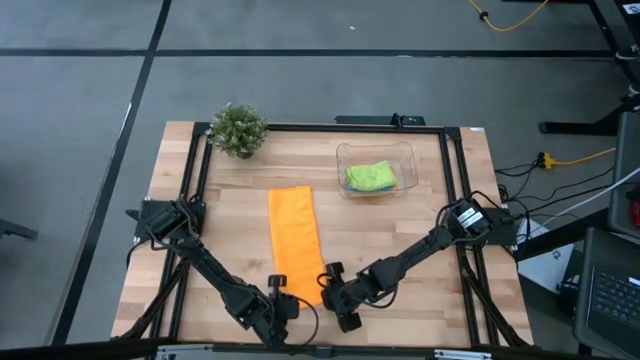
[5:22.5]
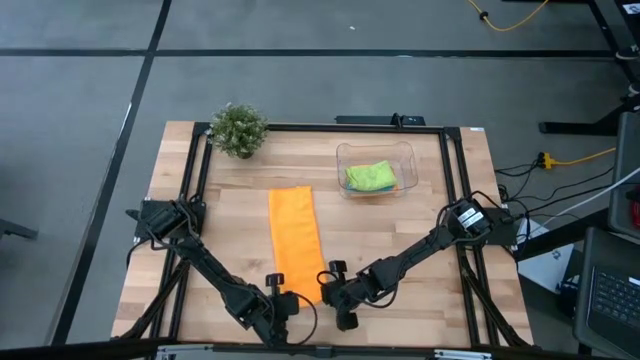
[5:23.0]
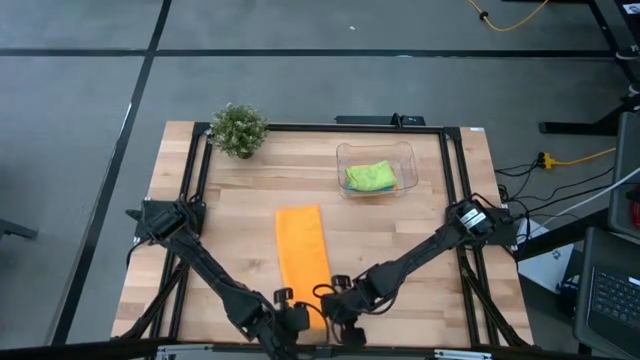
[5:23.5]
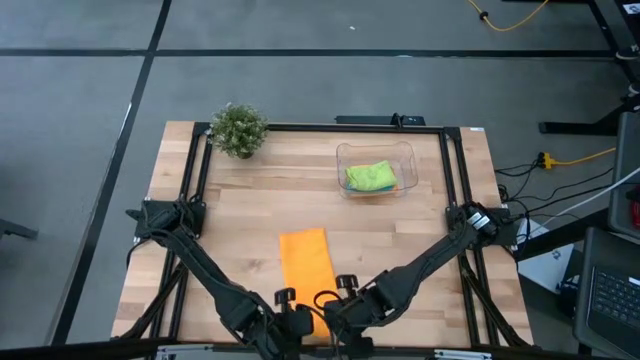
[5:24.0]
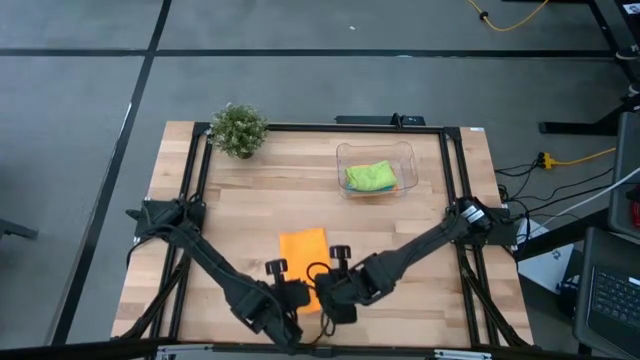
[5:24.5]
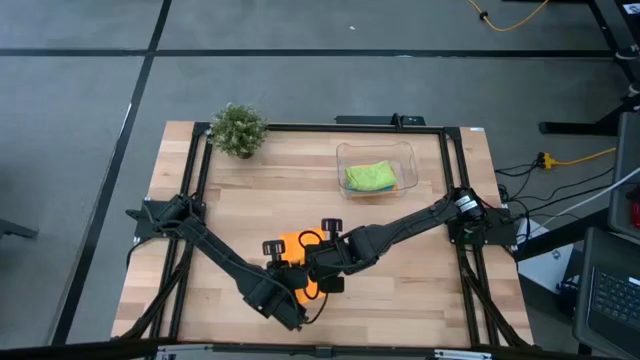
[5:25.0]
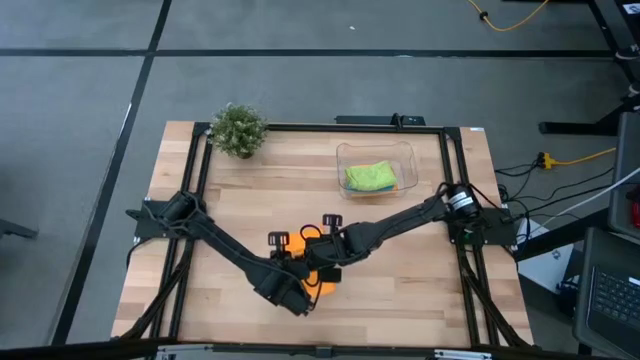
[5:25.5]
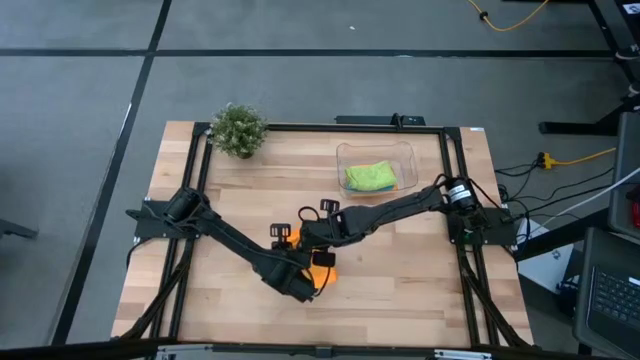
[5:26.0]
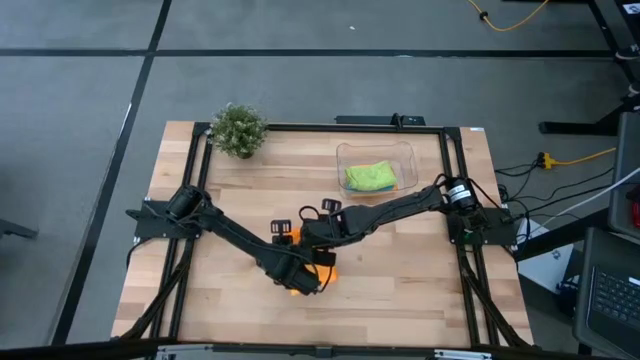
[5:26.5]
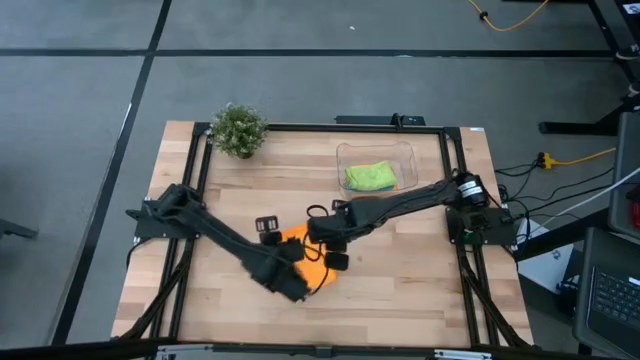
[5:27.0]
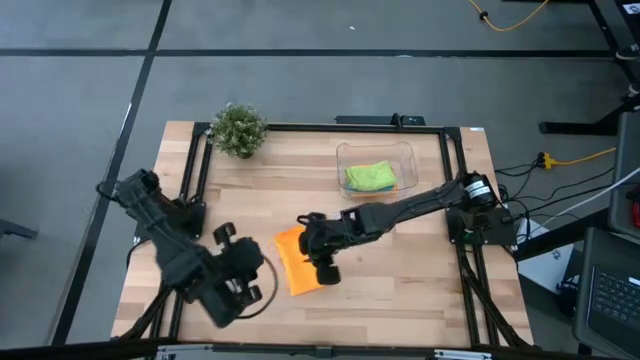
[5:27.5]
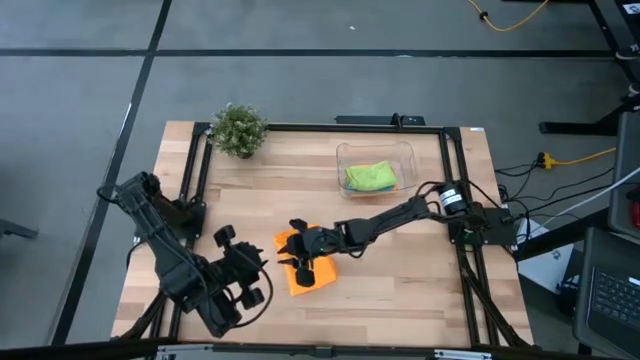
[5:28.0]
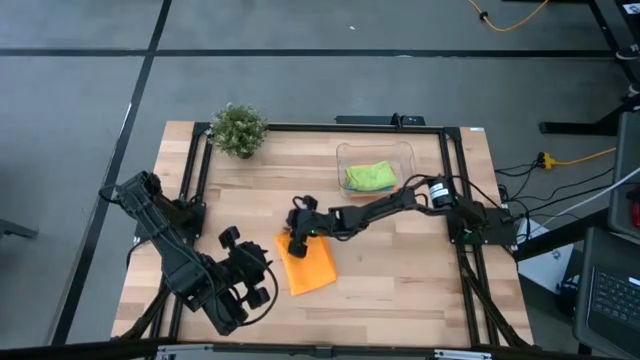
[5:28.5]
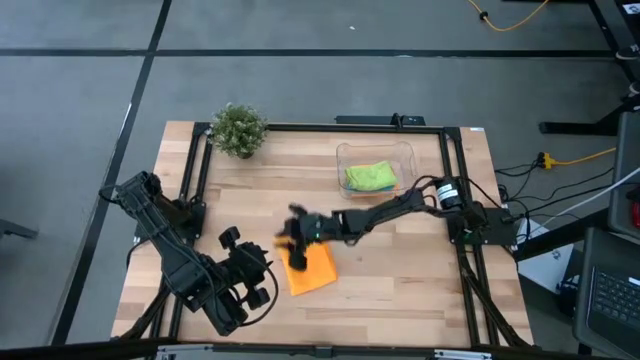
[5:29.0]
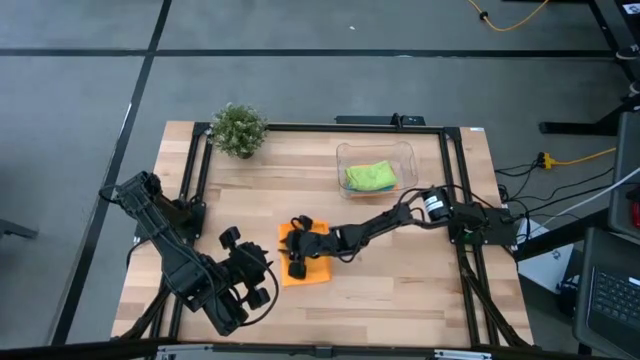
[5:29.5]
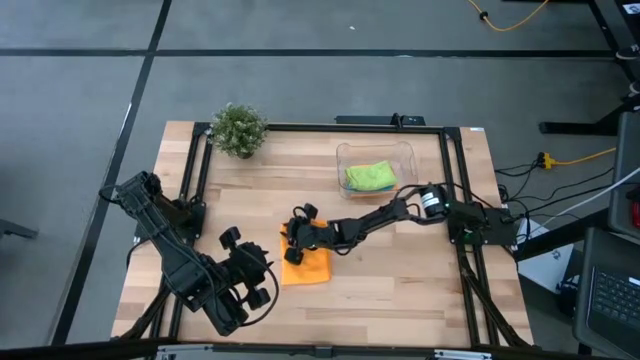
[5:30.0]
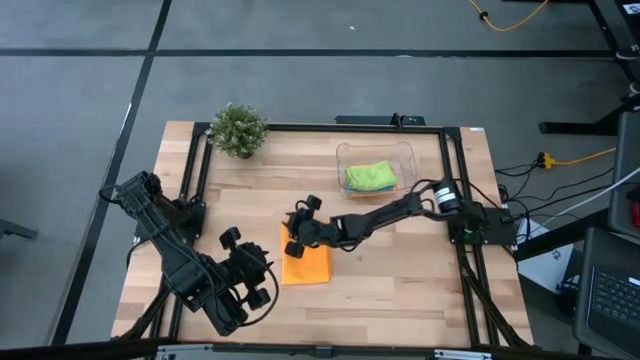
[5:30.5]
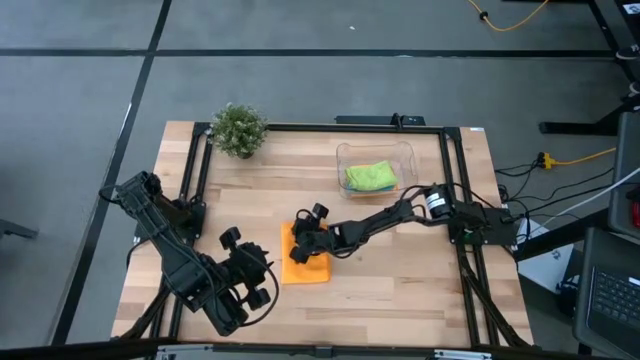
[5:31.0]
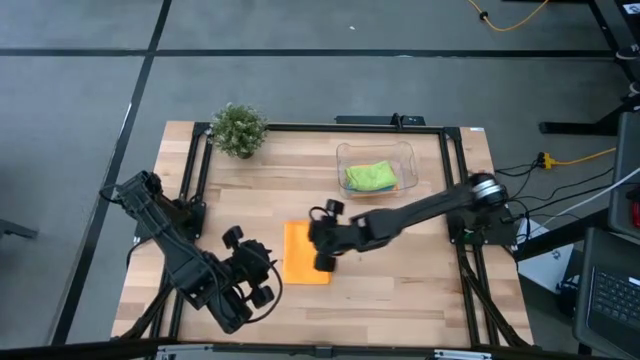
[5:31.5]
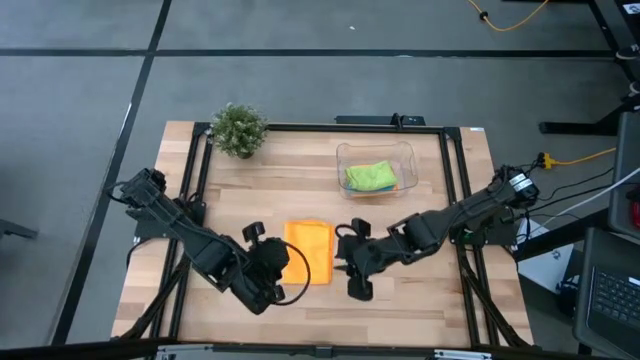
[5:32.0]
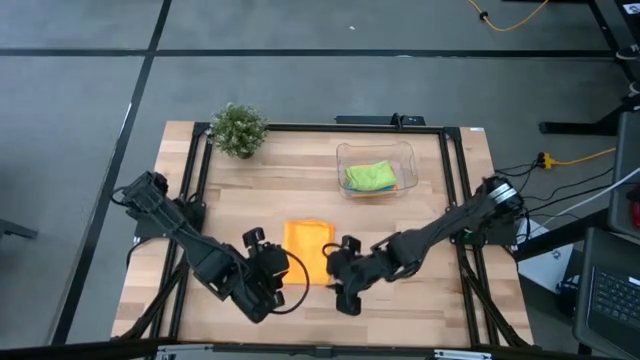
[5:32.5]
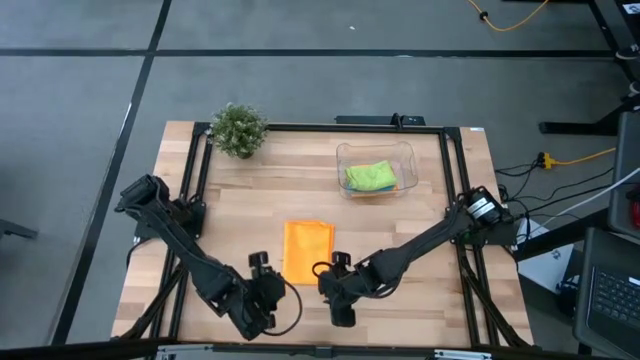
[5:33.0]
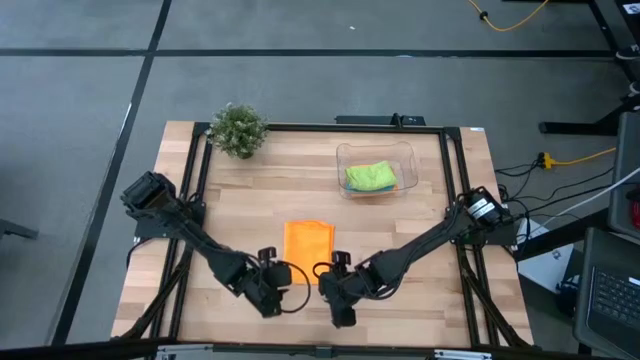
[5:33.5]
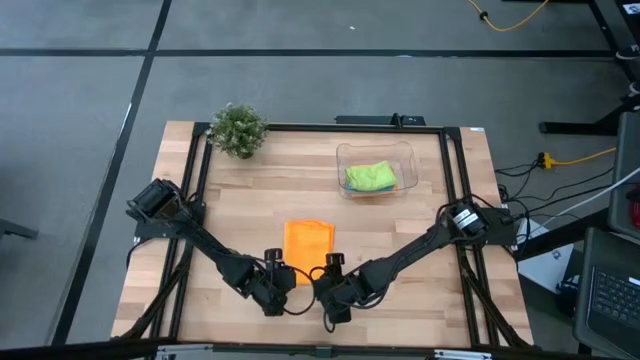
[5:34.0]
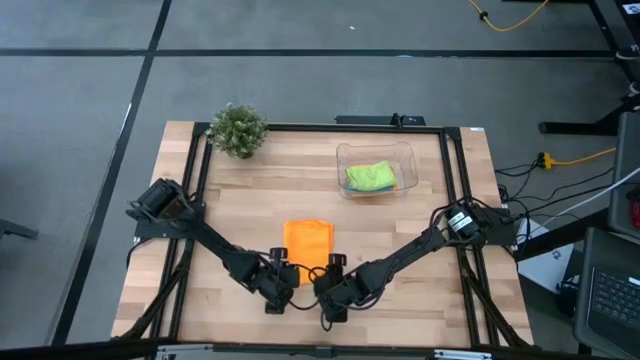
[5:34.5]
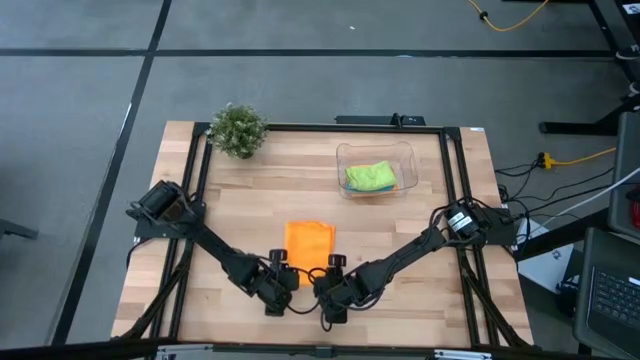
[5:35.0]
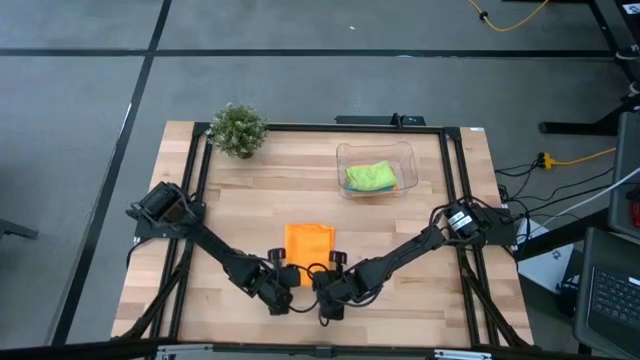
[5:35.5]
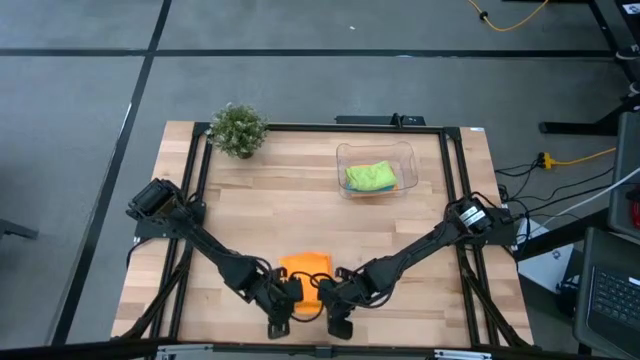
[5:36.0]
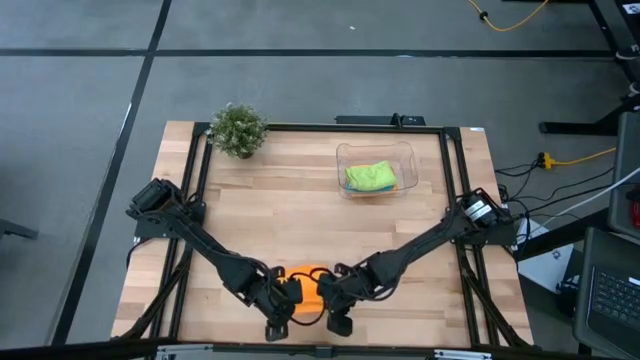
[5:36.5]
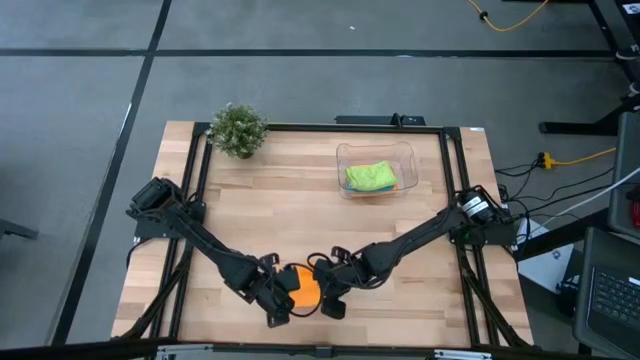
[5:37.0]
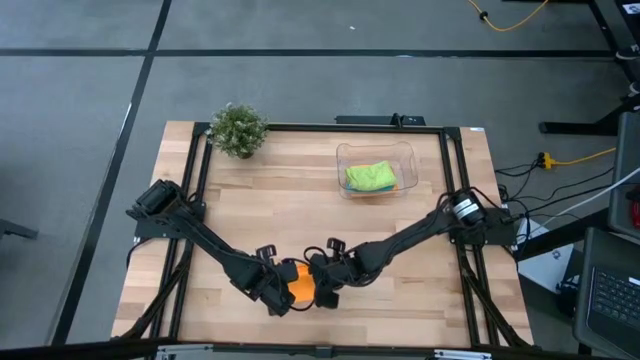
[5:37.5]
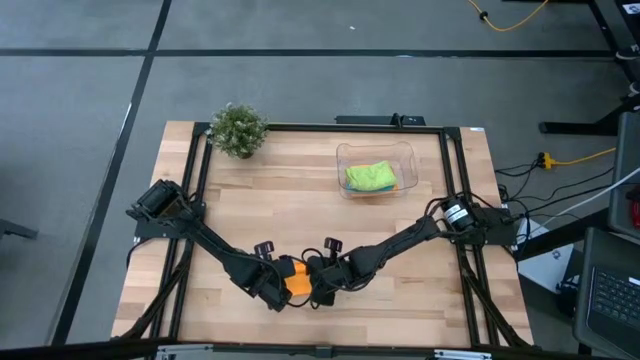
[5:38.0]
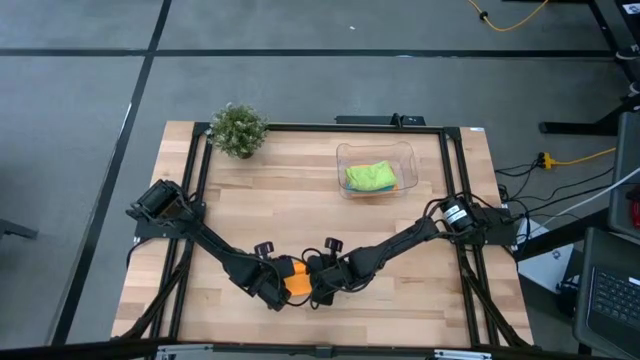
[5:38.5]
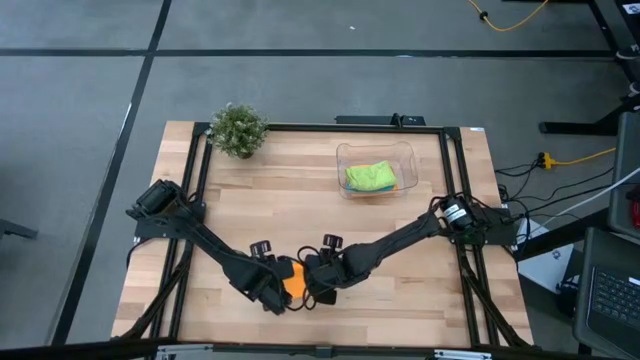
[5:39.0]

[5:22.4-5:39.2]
Task: Fold microfiber towels
Fold the orange microfiber cloth
